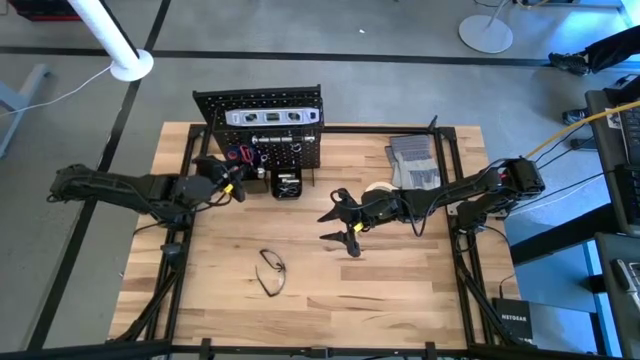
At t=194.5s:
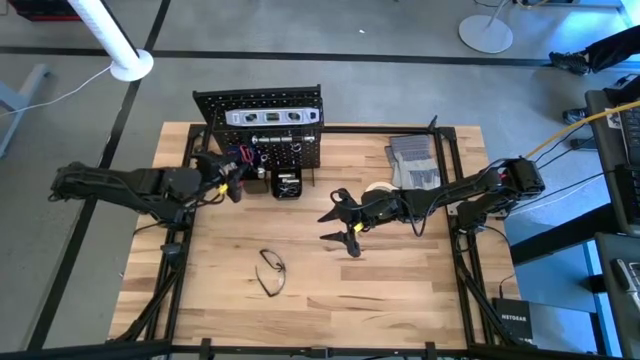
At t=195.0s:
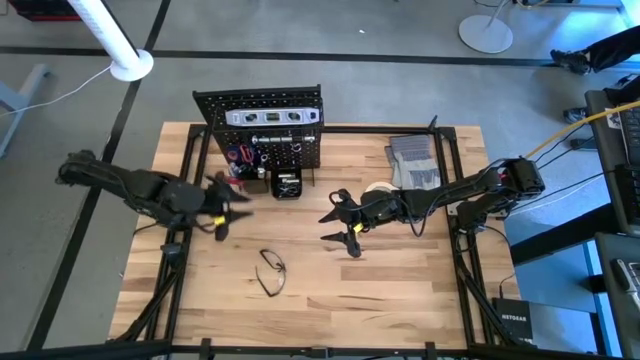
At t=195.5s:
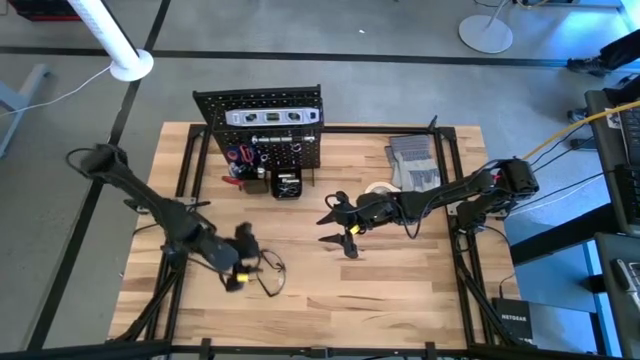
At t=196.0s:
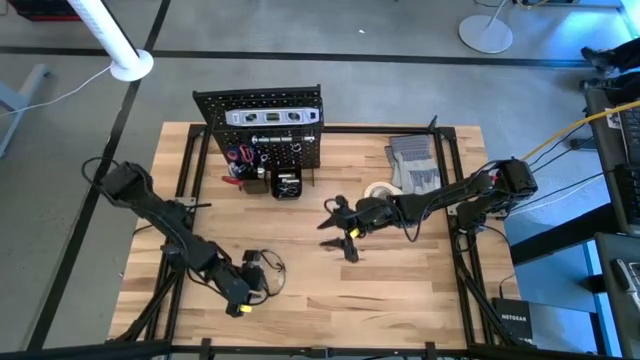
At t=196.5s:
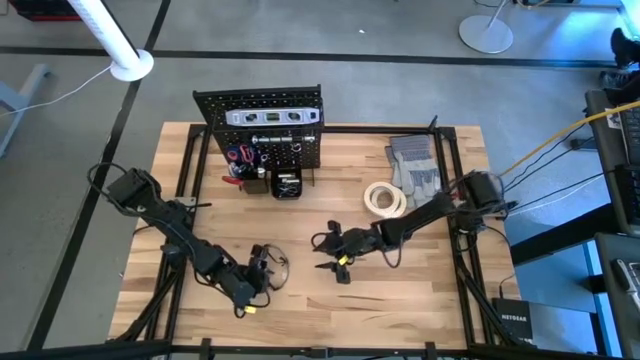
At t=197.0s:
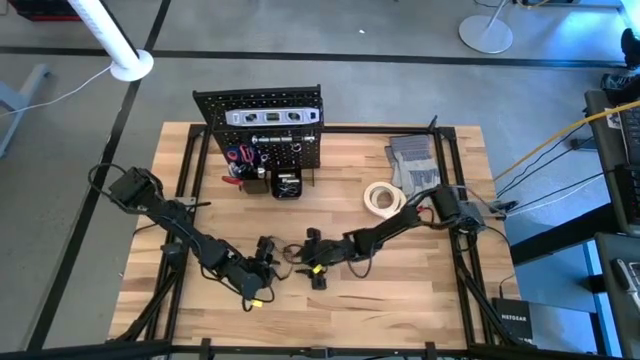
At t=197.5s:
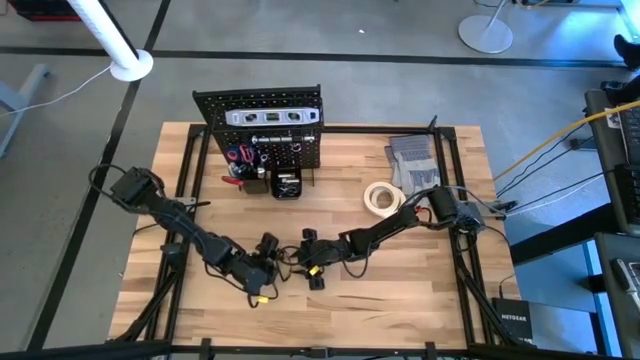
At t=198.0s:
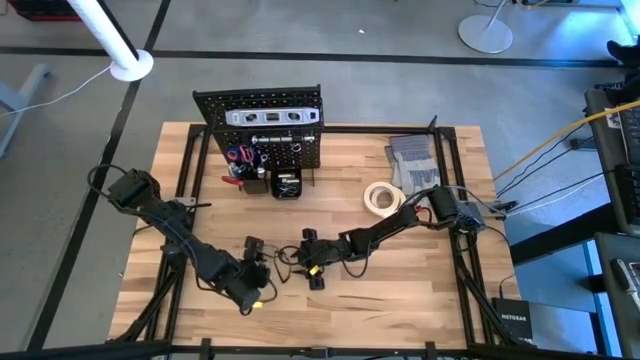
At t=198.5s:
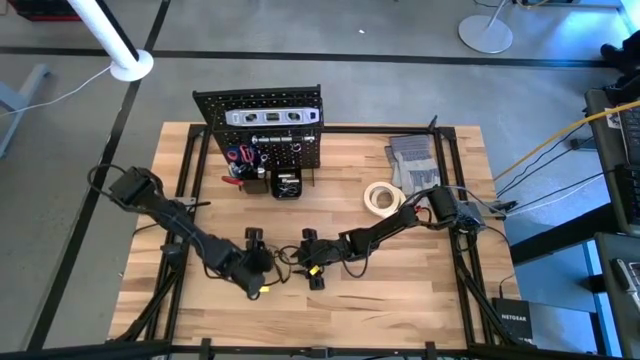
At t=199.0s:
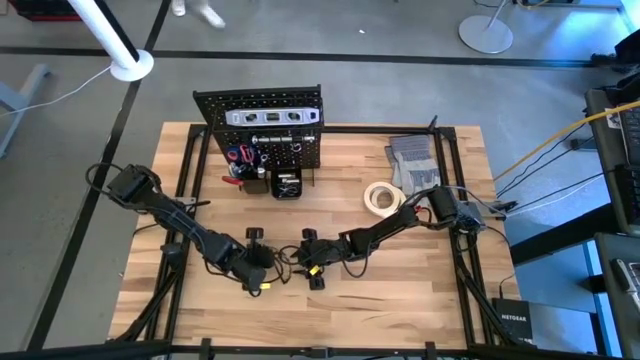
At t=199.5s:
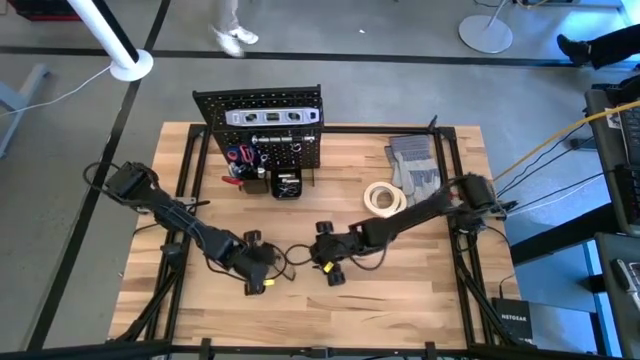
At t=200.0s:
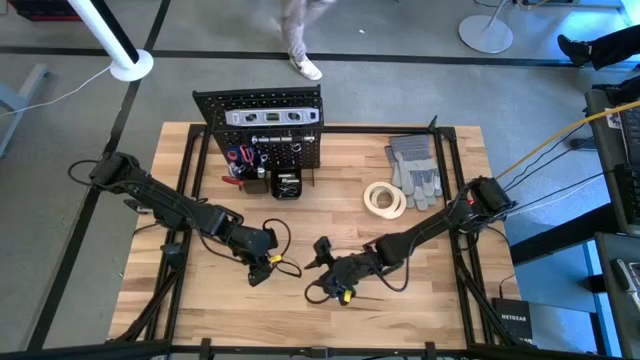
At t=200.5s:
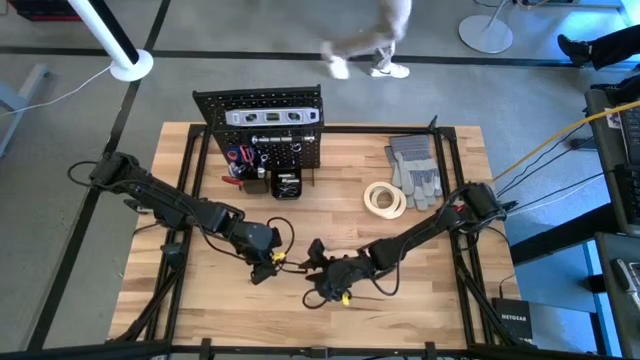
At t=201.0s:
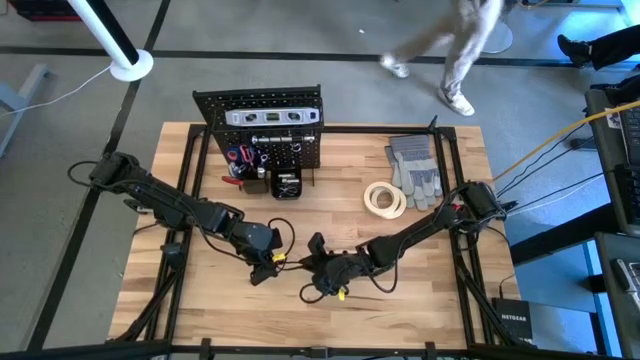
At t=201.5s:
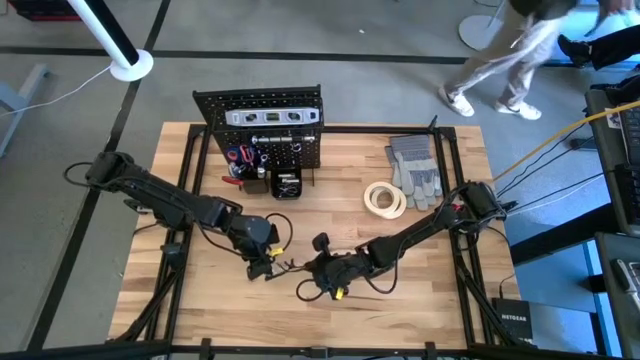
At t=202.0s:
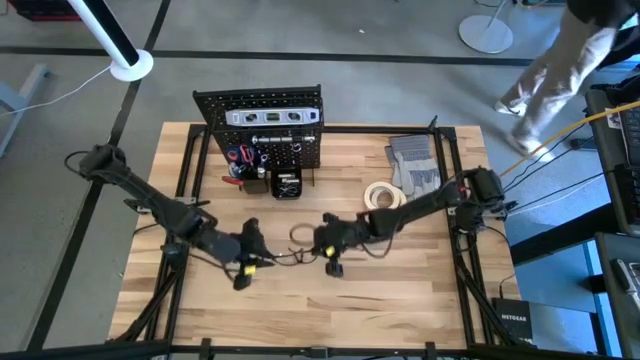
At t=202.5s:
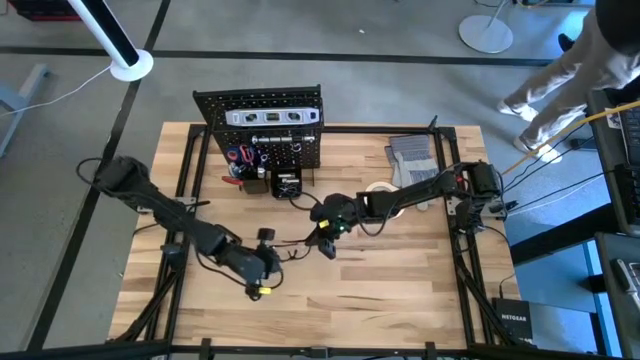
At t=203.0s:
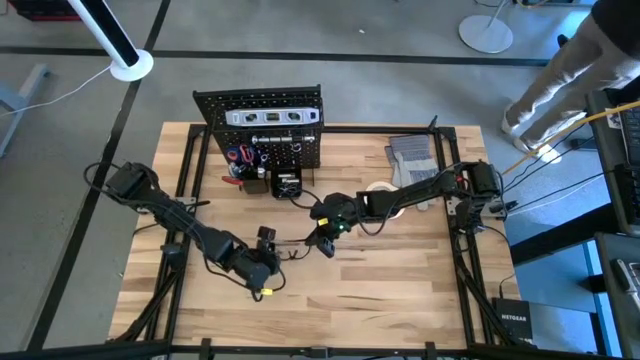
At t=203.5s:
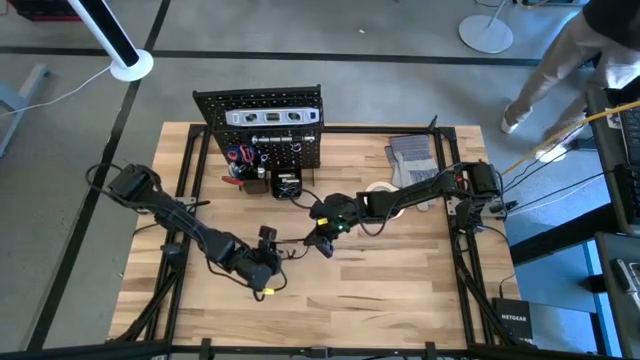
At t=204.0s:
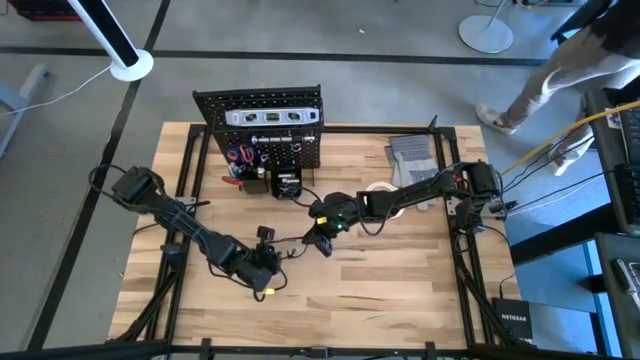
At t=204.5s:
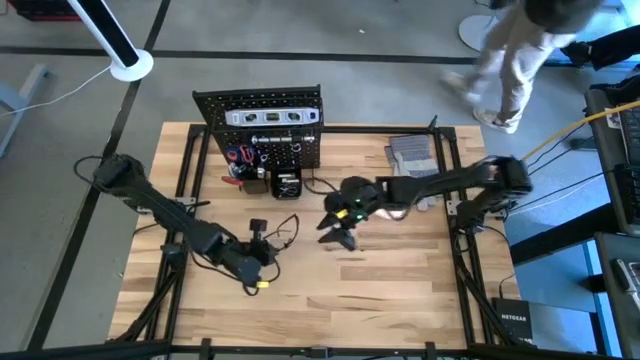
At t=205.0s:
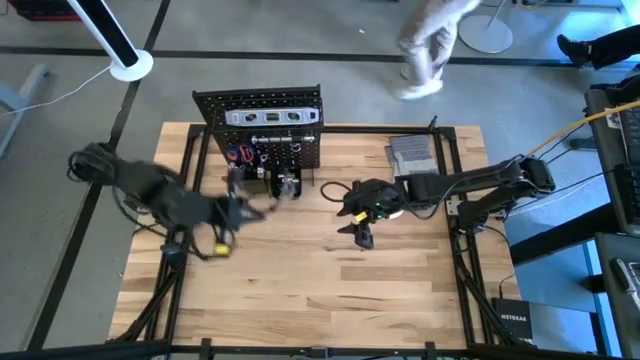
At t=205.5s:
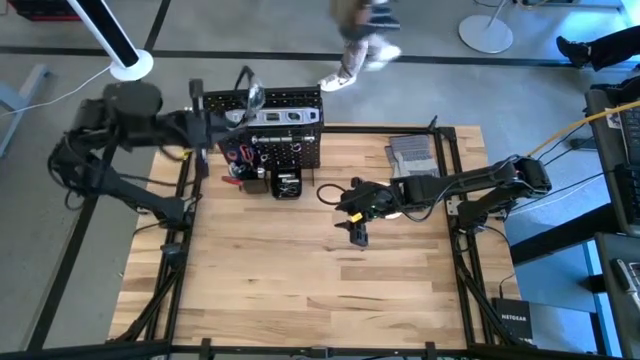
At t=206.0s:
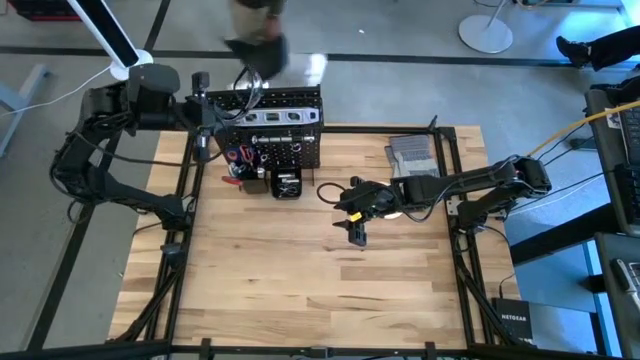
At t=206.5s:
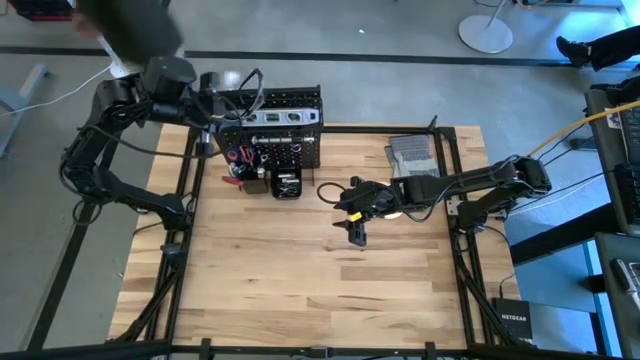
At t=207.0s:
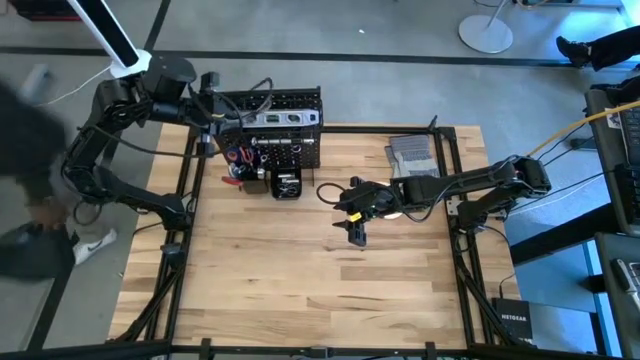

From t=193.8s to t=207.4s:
Task: Hang tools onto peg board
Put the safety glasses on the peg board

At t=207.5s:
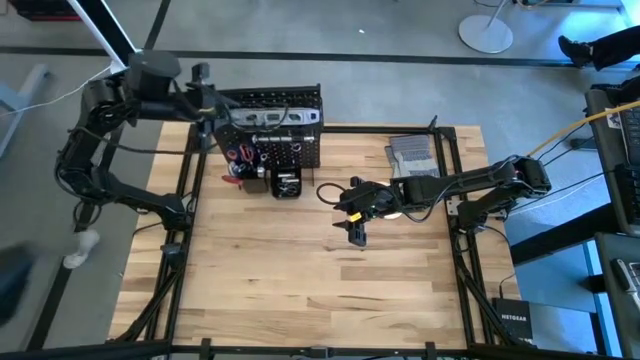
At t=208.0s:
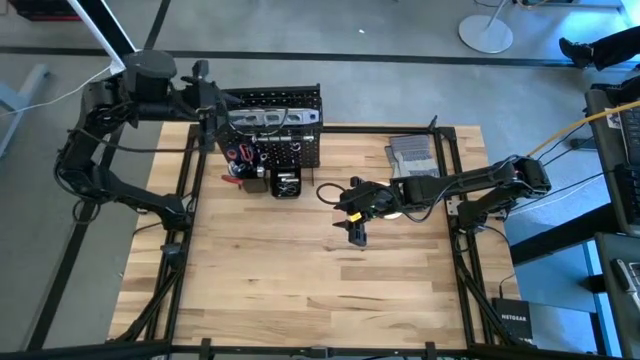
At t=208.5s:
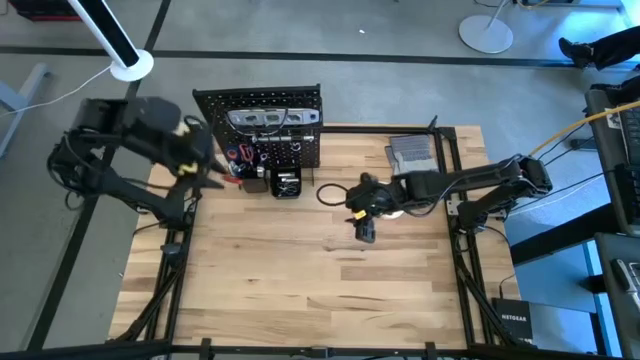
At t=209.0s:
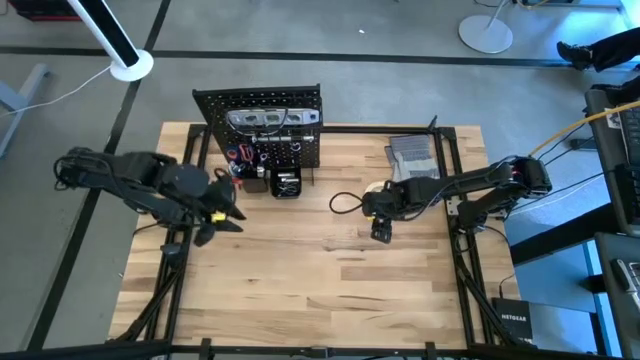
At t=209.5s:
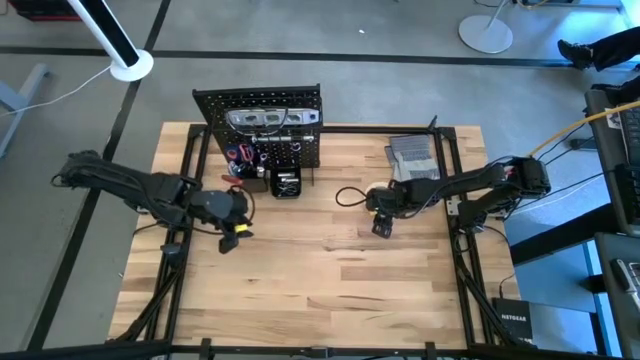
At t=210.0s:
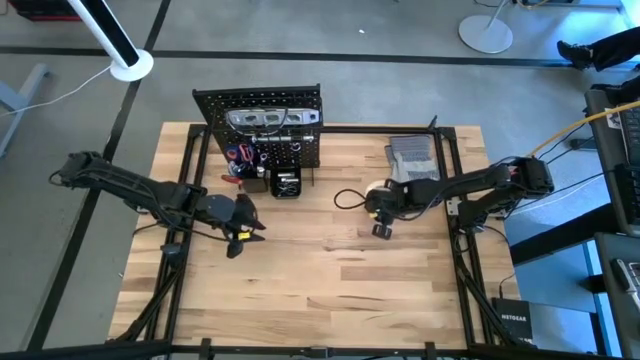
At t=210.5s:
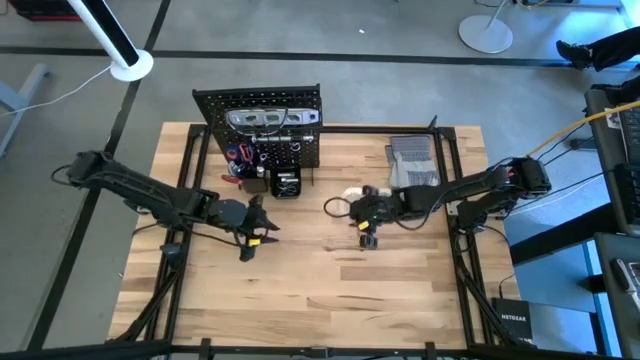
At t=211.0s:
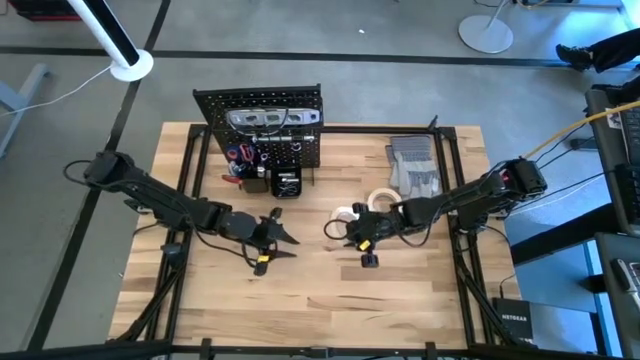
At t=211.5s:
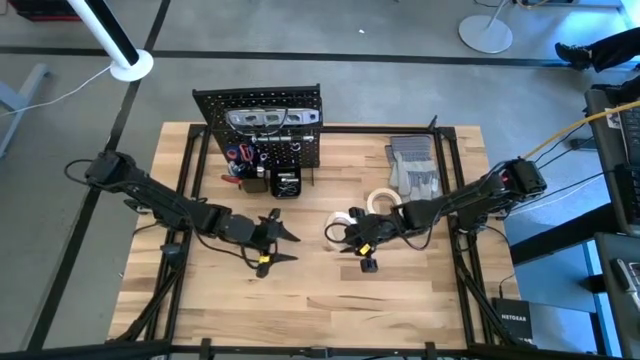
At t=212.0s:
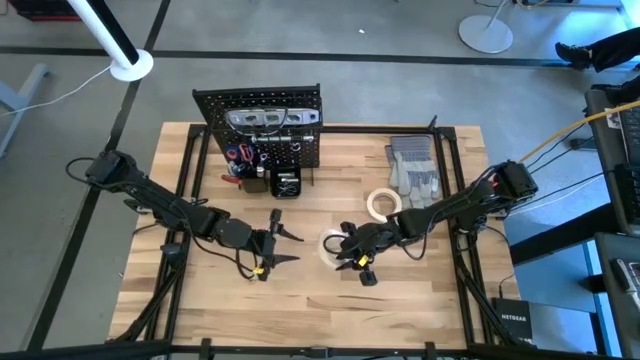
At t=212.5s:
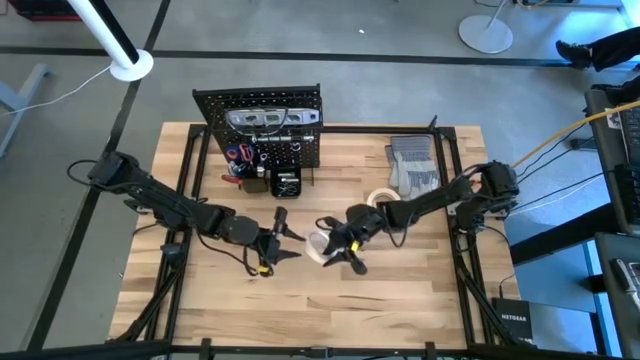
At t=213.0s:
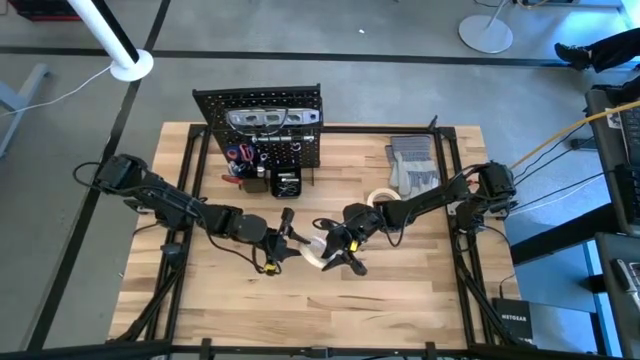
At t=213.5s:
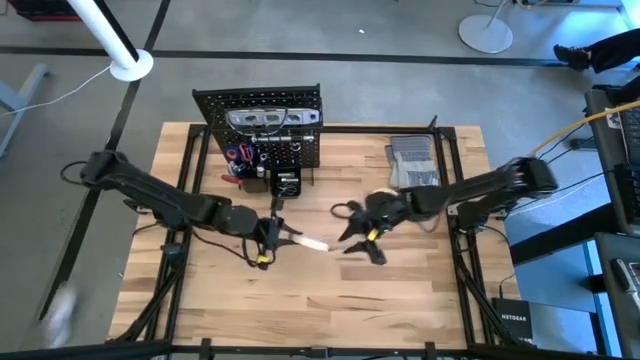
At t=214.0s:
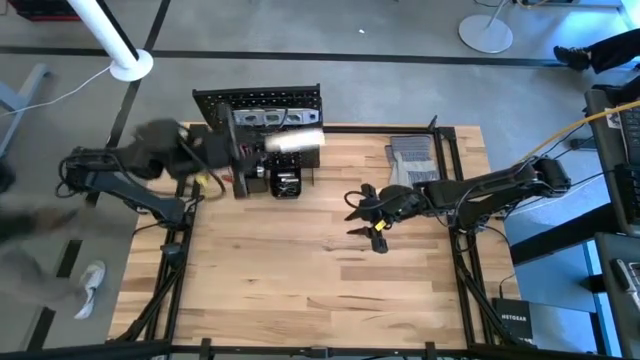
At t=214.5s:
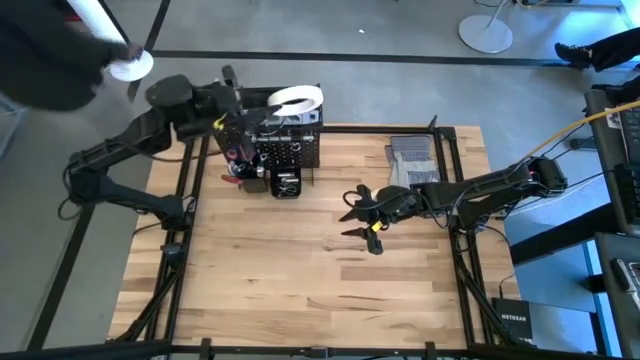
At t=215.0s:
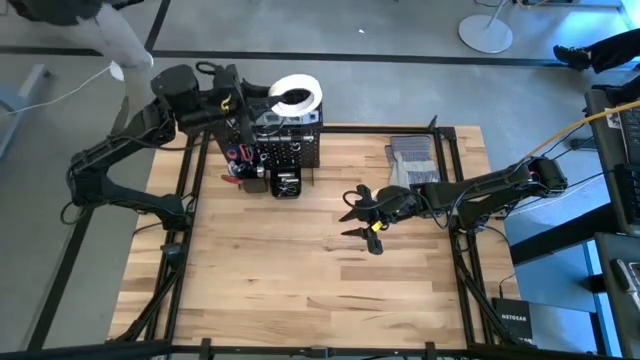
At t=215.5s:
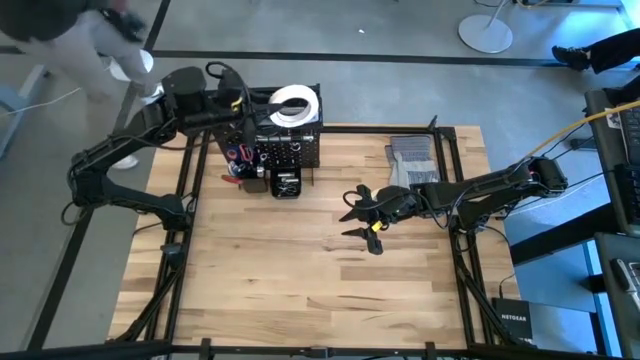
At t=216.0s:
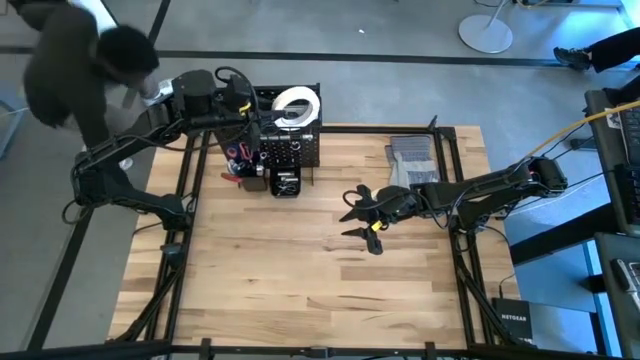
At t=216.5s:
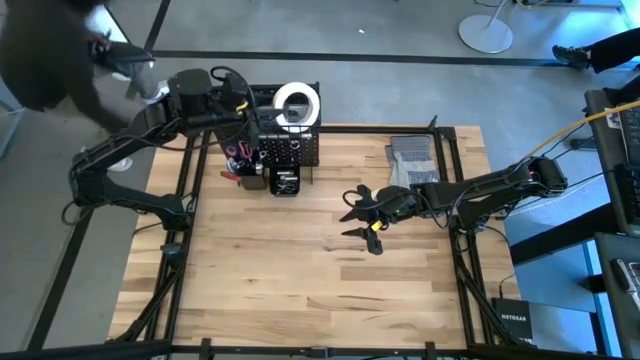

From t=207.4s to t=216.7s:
Put the white masking tape on the peg board
